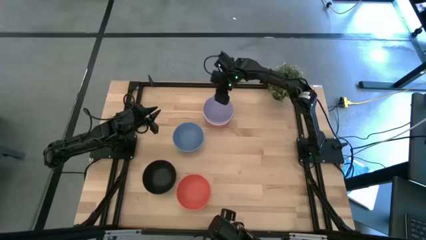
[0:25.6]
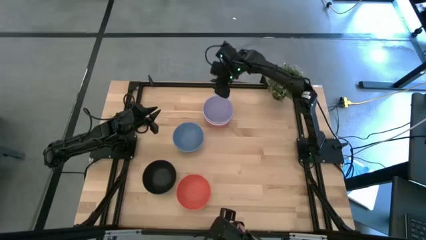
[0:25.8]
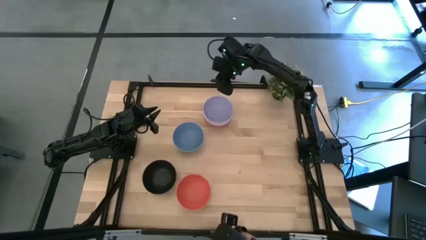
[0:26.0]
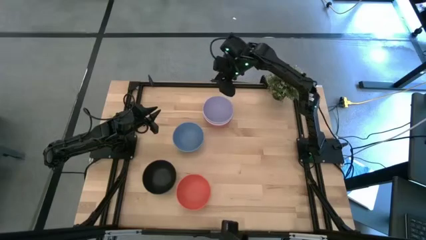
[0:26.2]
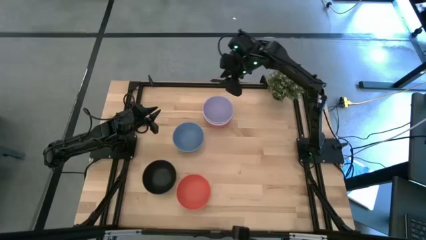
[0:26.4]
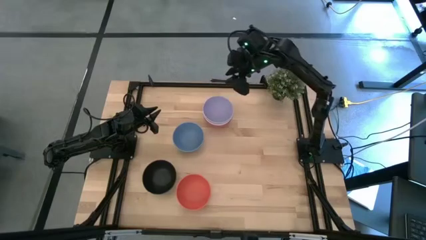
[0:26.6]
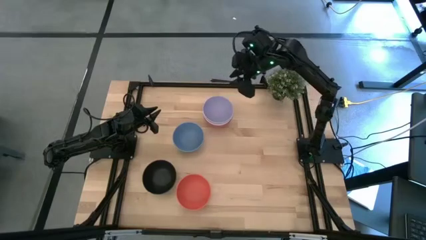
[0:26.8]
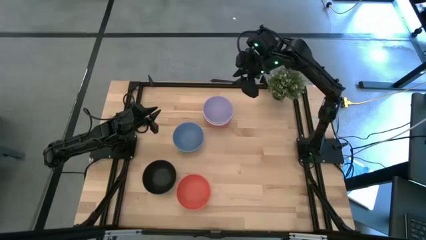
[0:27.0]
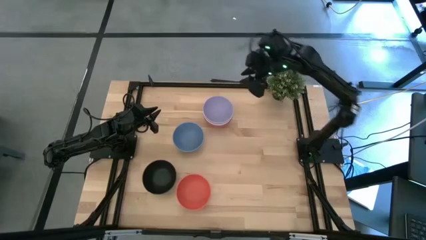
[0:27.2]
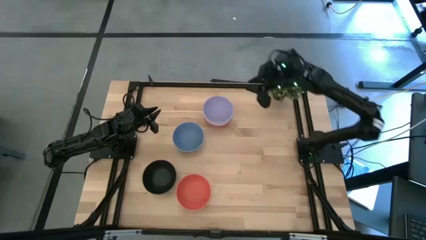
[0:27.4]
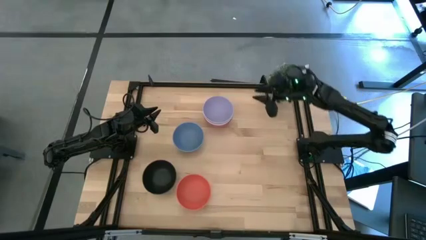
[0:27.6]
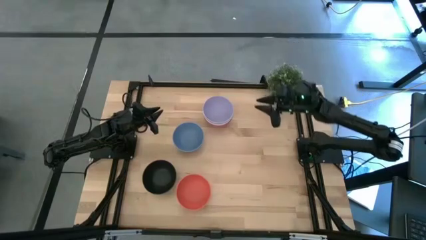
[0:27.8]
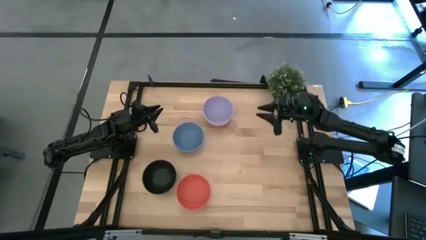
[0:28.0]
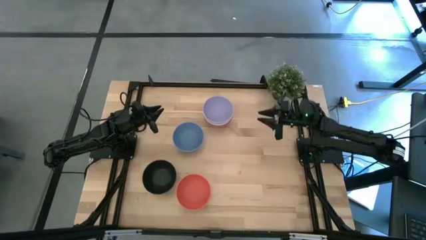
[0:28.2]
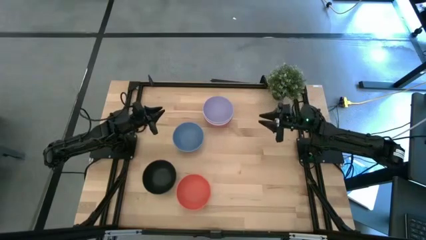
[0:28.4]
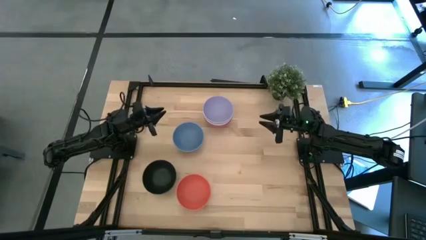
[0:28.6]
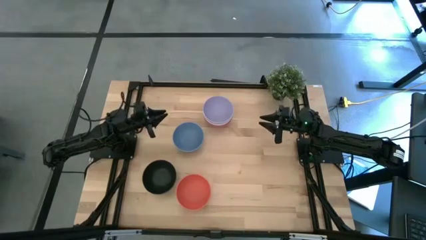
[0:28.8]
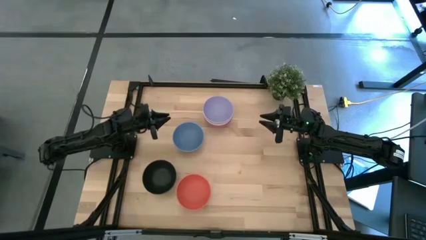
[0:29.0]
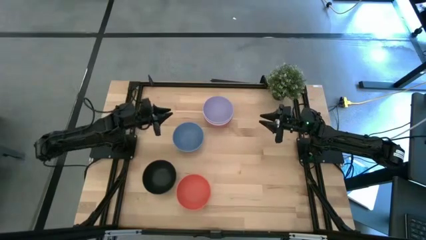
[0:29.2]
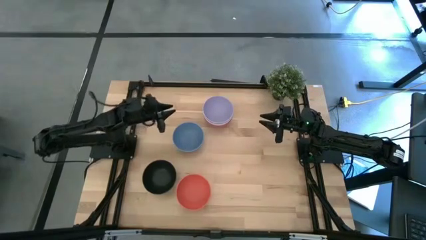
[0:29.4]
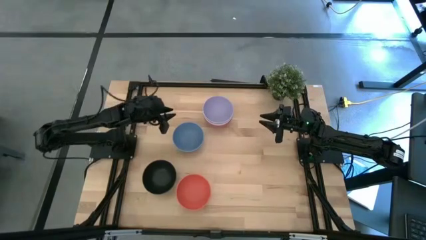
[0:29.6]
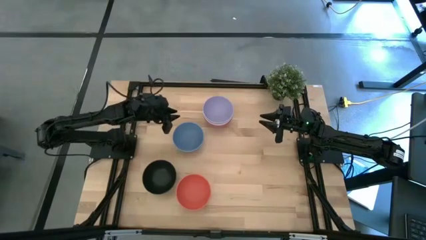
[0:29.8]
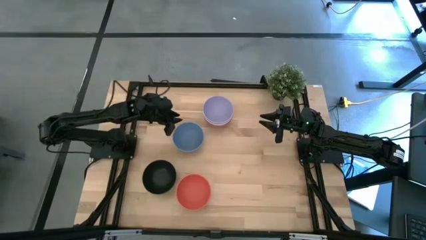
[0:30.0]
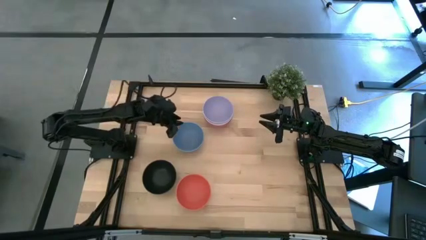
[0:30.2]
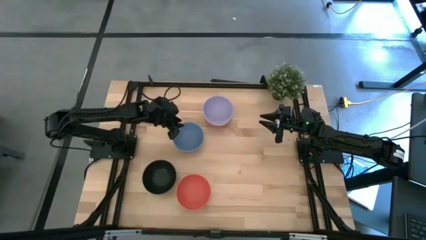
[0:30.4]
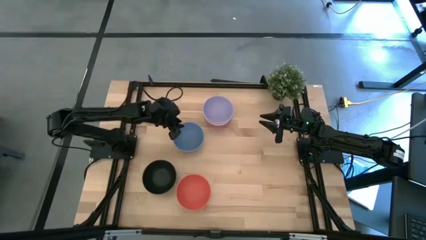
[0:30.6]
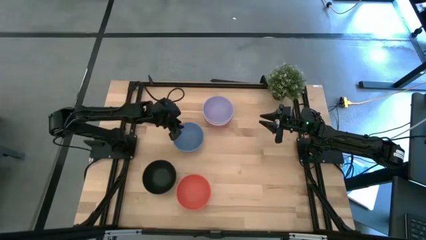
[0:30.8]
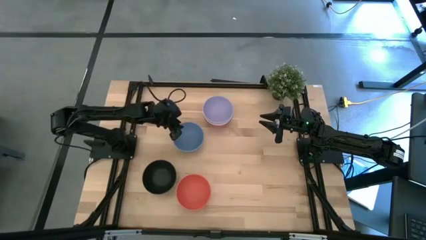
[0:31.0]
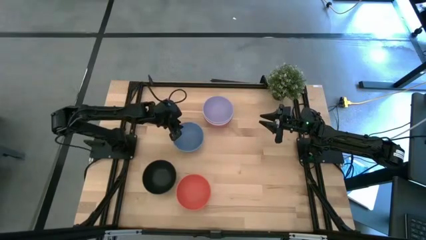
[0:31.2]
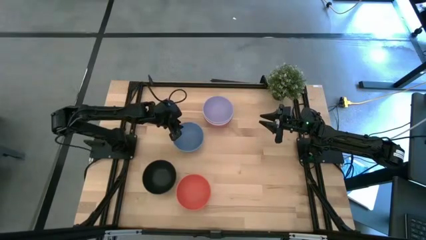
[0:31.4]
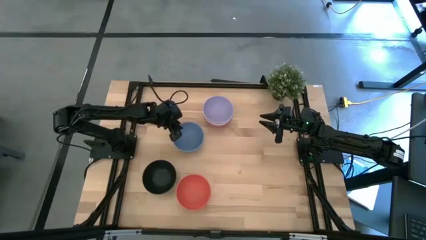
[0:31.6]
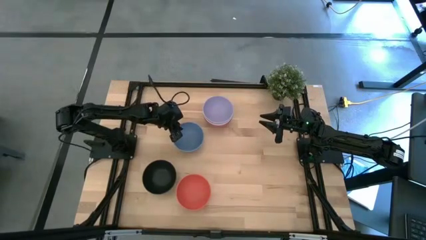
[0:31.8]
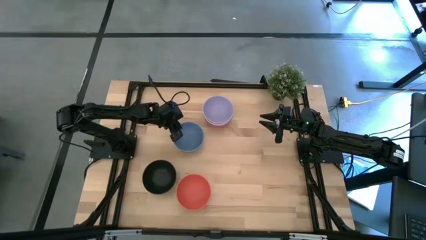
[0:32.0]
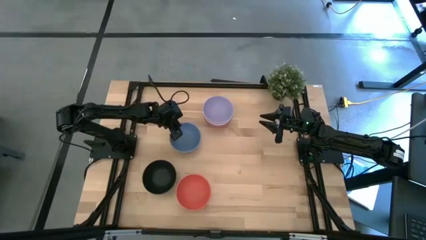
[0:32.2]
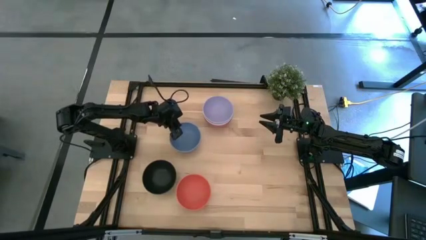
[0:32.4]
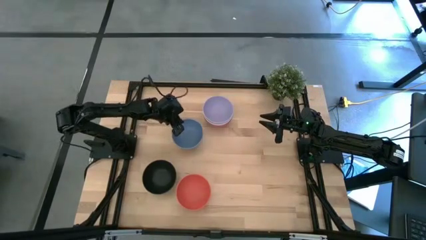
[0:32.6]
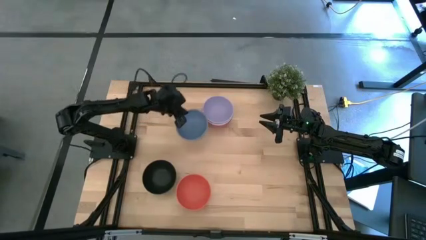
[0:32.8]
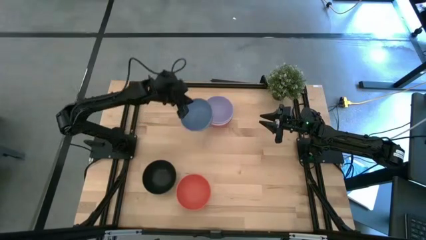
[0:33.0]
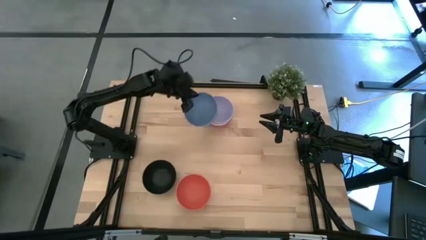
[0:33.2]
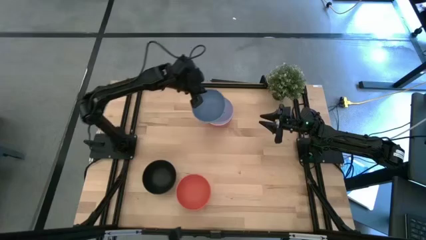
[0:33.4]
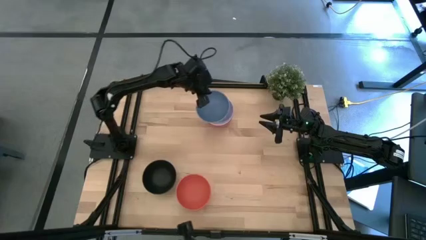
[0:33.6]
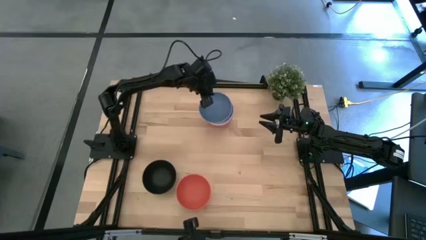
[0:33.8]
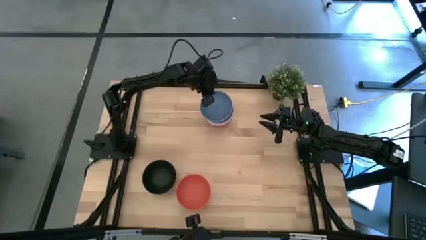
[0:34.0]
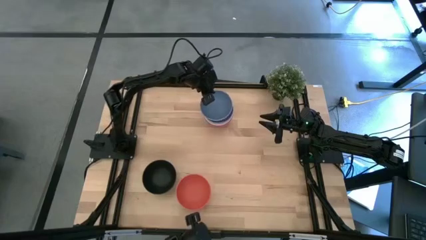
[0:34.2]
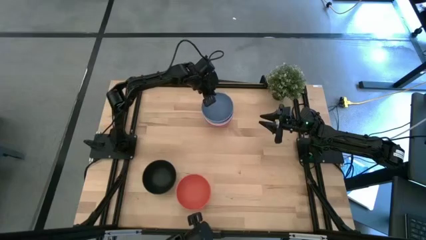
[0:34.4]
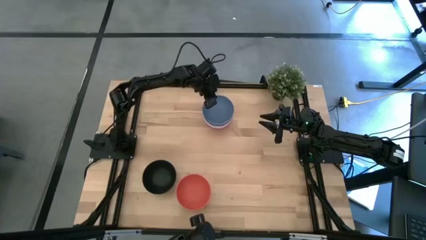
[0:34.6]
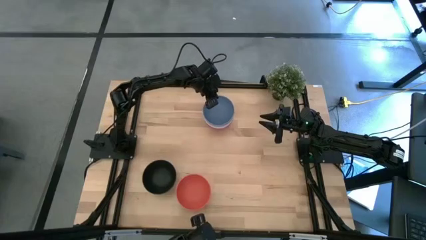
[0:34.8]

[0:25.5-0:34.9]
Task: Nest bowls inside each other
Stack the blue bowl on top of the purple bowl

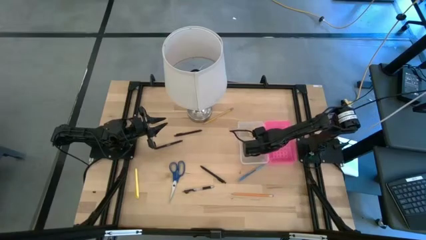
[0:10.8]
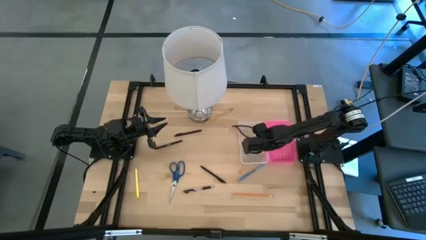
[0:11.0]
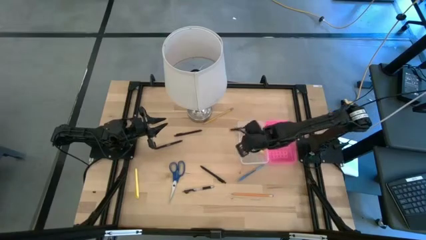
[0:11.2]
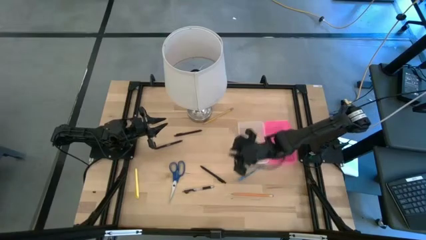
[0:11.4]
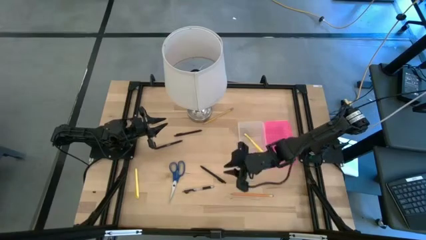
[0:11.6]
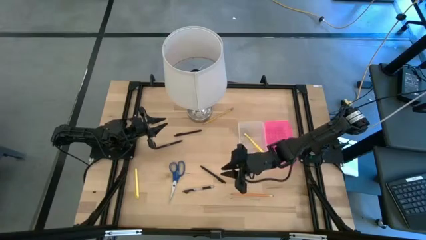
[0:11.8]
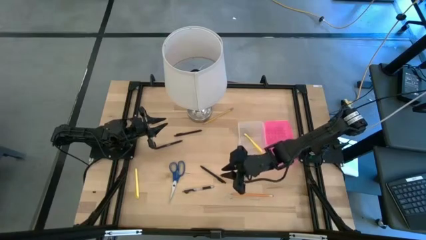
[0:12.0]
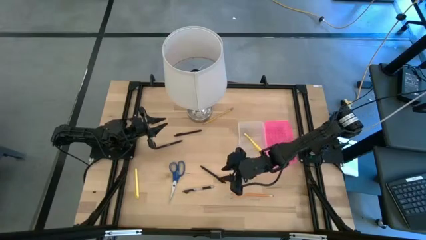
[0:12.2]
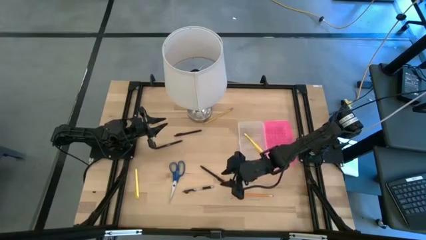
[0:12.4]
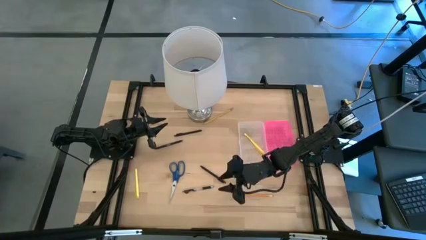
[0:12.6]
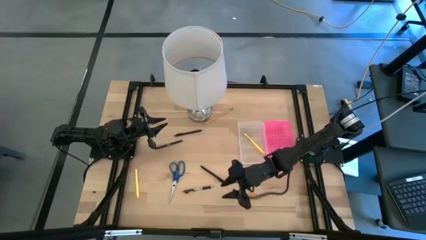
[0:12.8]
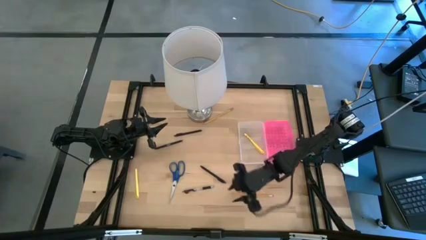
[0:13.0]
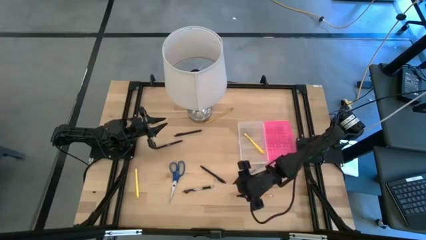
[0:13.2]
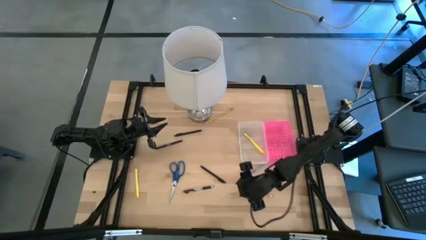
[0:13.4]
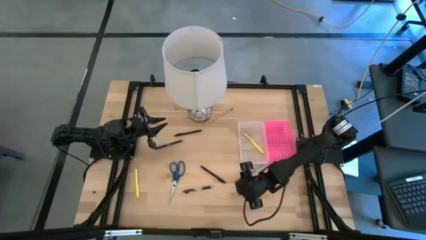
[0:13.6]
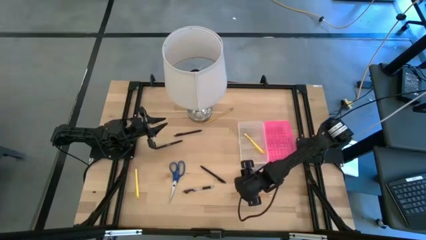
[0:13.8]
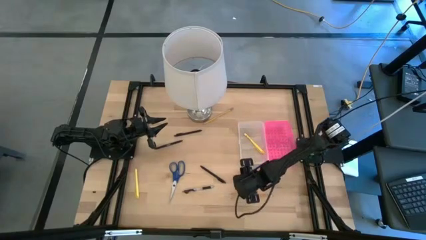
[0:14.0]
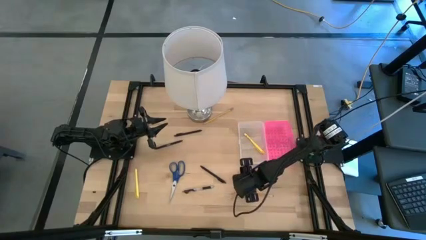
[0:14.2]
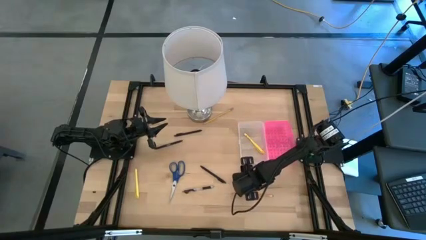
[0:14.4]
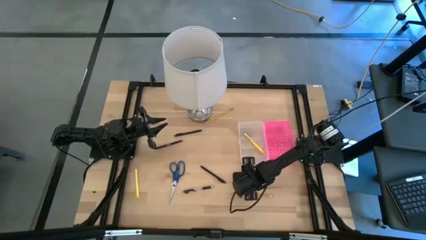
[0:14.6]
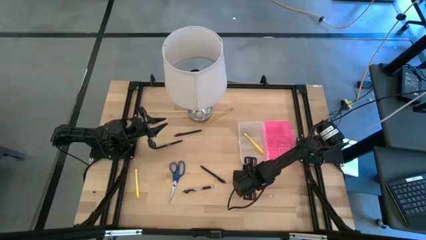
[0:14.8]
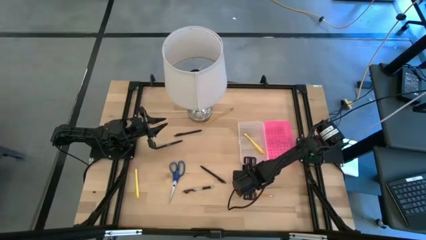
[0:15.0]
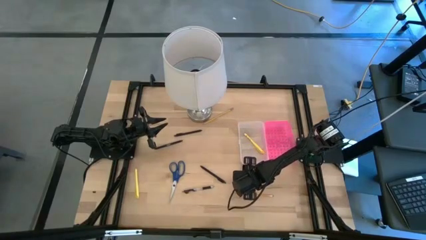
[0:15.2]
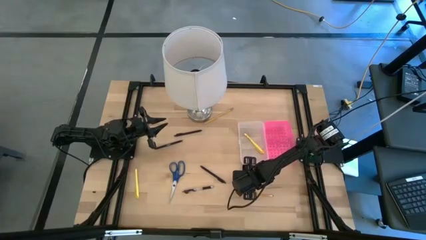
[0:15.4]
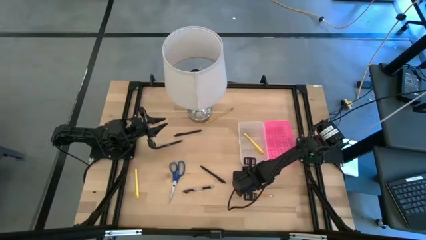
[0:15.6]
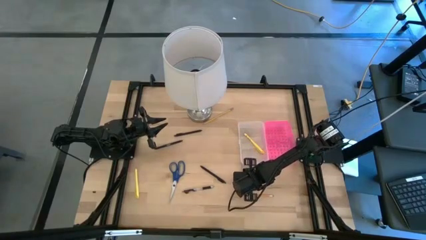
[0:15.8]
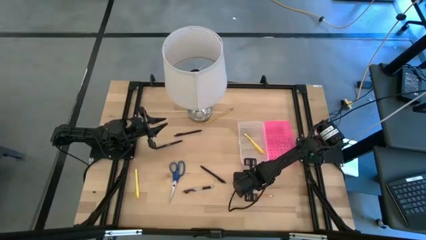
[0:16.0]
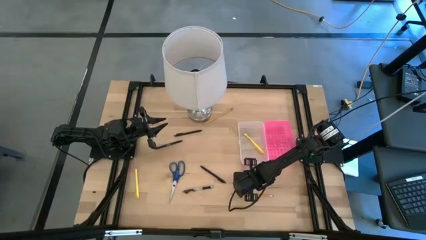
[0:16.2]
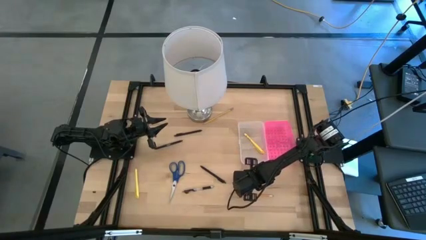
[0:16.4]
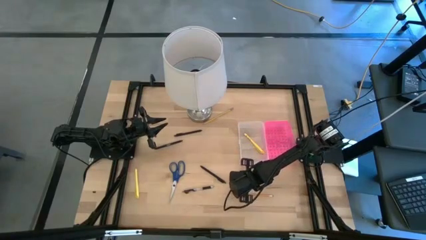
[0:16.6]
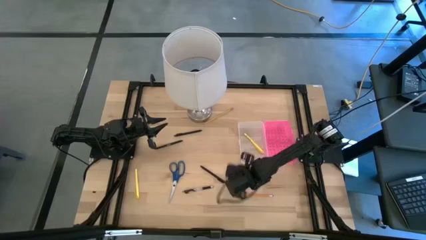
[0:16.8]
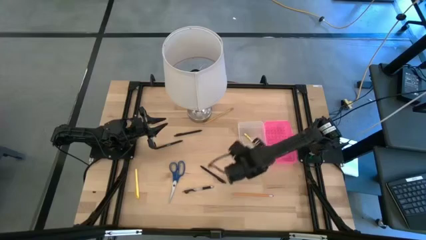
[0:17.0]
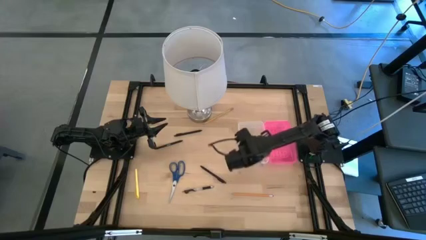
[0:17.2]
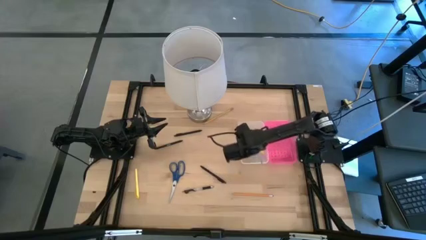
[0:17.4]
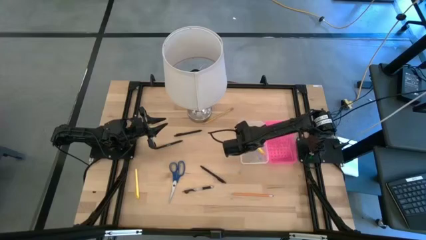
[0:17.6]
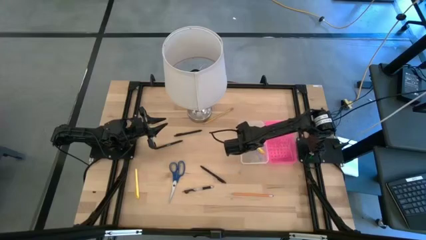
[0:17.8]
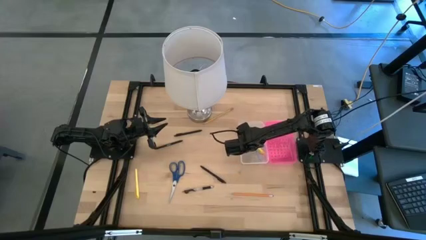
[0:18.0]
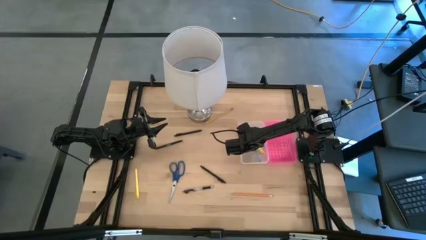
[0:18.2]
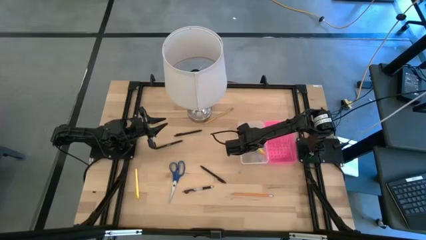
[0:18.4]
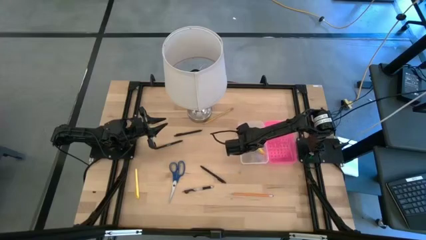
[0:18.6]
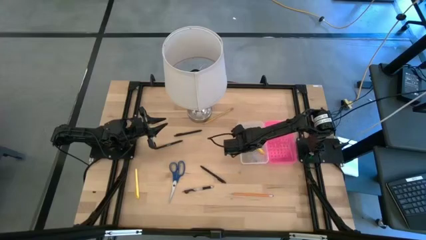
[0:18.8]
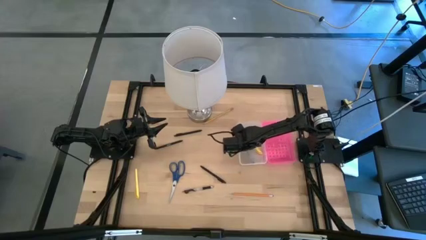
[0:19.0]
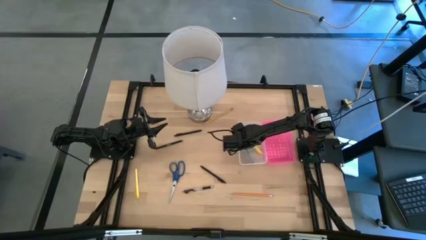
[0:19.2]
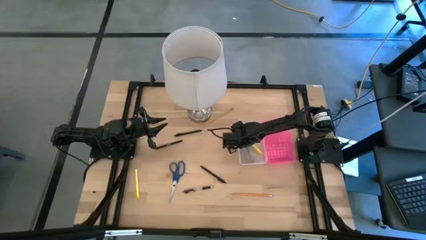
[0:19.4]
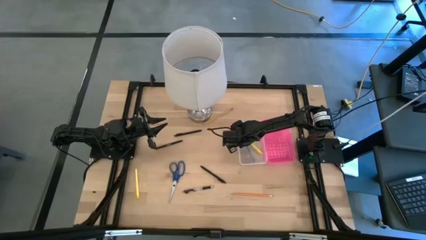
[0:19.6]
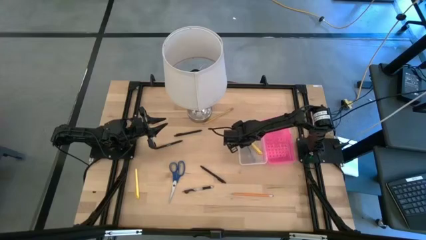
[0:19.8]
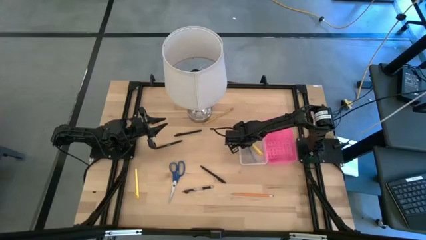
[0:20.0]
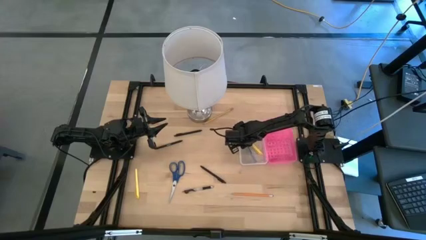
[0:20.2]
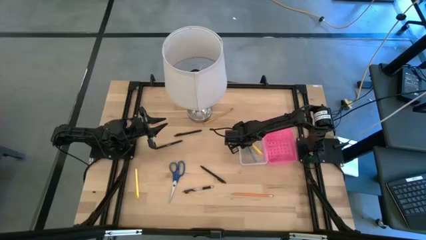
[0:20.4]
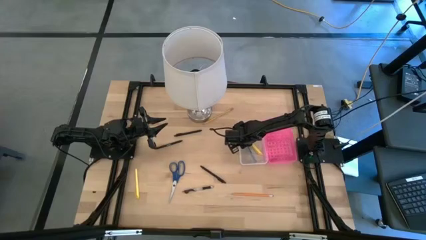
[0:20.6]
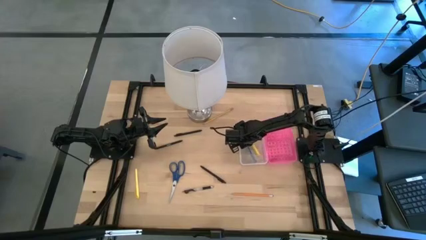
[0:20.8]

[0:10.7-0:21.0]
Task: Pick & place school supplies into a supply box
Put the blue pen into the supply box
